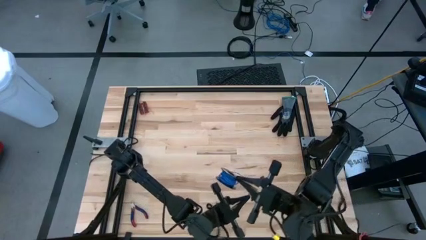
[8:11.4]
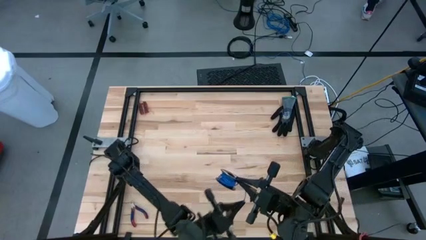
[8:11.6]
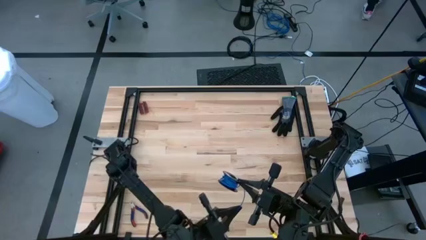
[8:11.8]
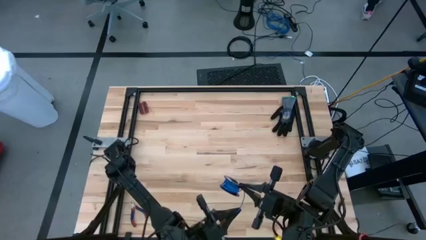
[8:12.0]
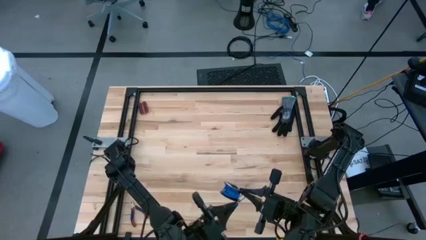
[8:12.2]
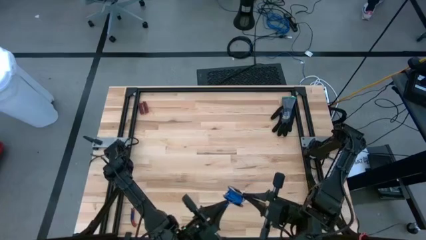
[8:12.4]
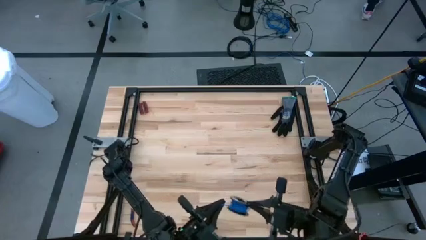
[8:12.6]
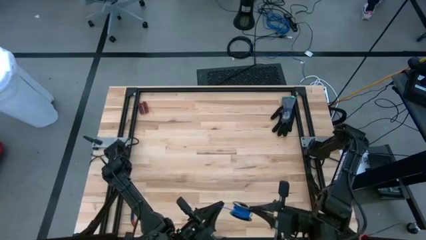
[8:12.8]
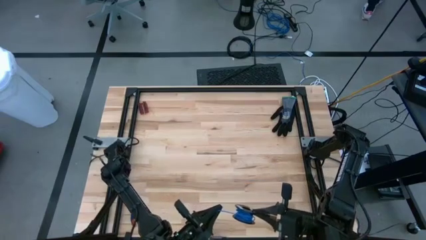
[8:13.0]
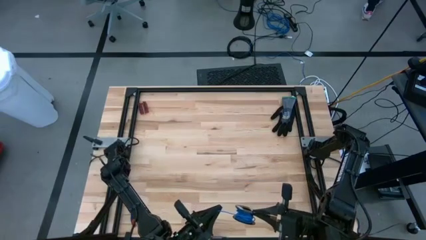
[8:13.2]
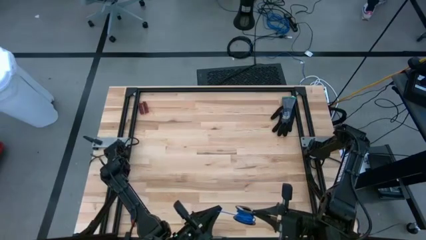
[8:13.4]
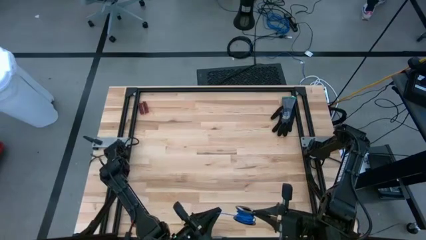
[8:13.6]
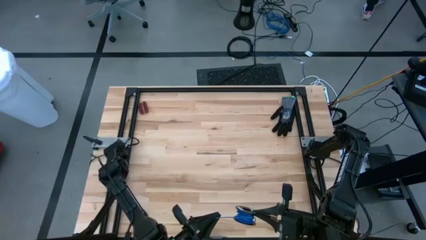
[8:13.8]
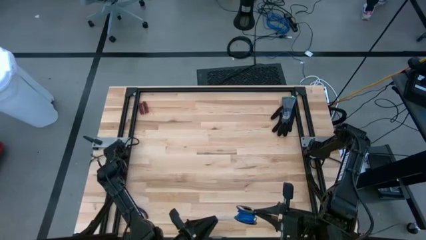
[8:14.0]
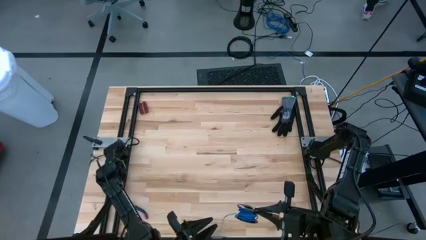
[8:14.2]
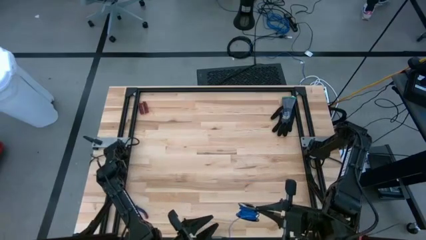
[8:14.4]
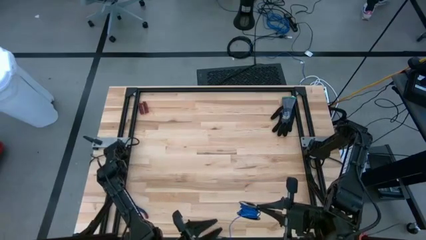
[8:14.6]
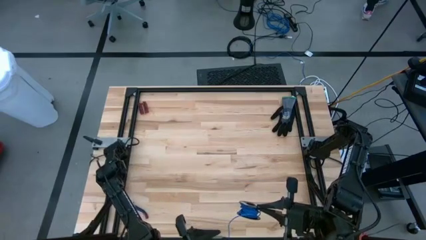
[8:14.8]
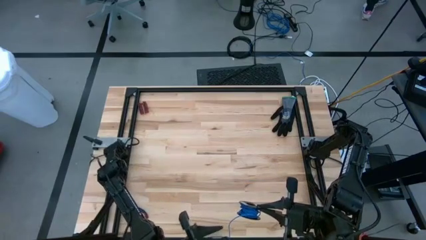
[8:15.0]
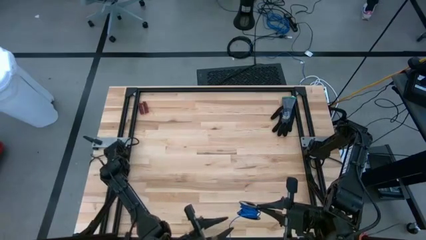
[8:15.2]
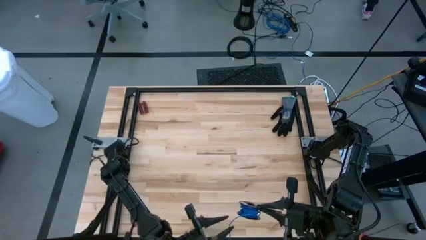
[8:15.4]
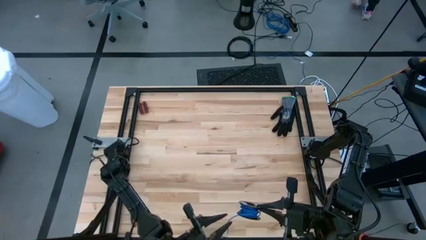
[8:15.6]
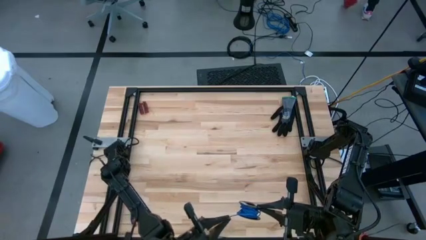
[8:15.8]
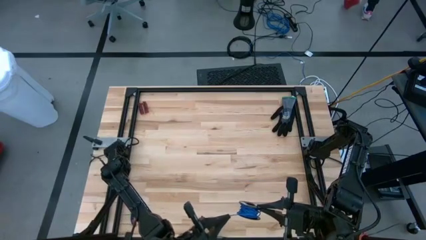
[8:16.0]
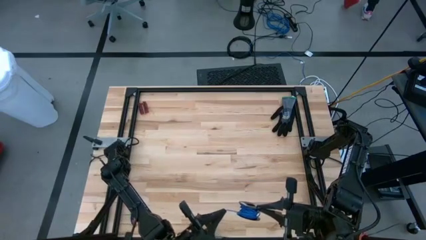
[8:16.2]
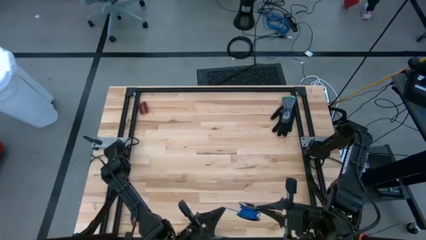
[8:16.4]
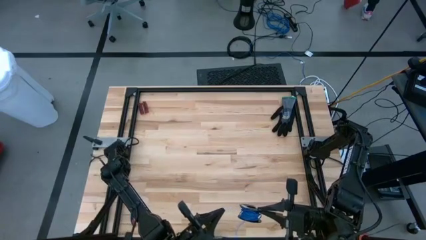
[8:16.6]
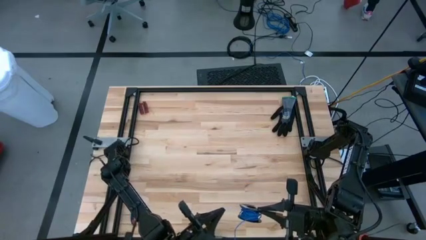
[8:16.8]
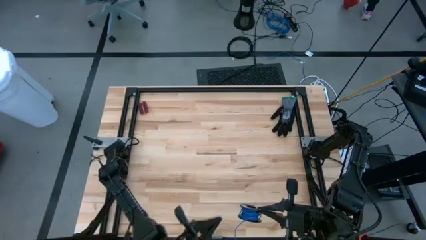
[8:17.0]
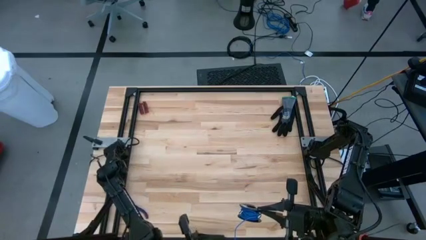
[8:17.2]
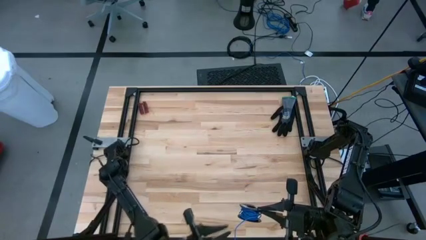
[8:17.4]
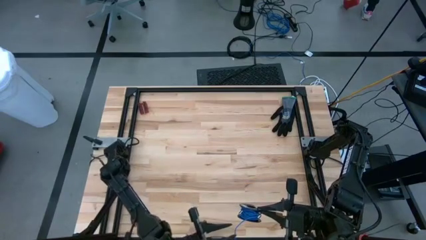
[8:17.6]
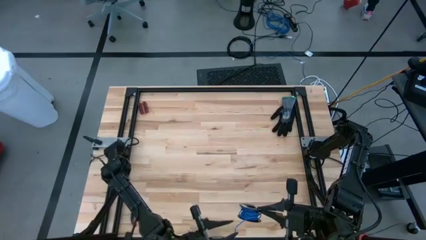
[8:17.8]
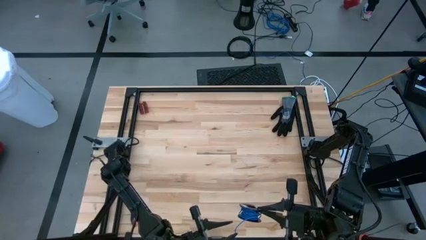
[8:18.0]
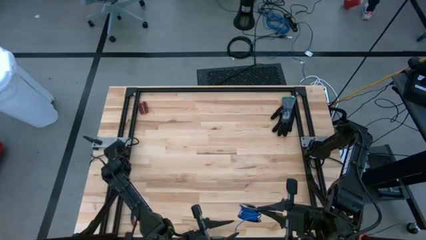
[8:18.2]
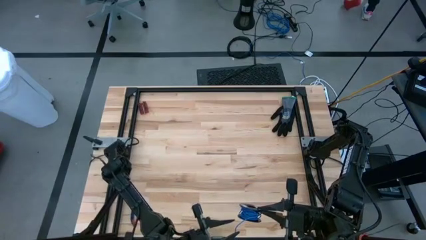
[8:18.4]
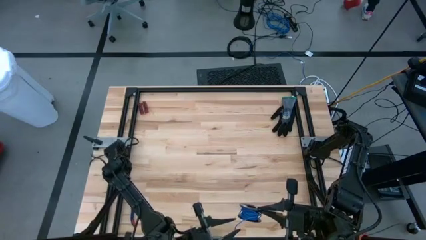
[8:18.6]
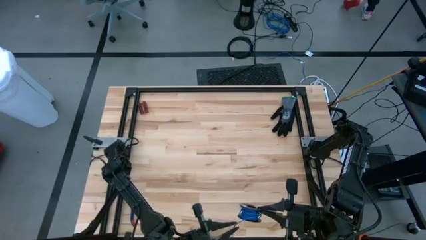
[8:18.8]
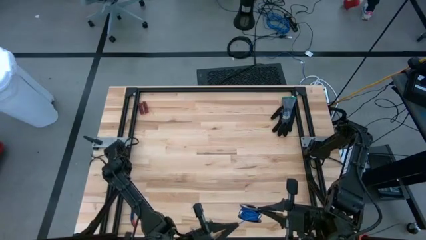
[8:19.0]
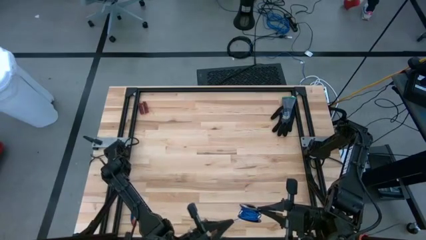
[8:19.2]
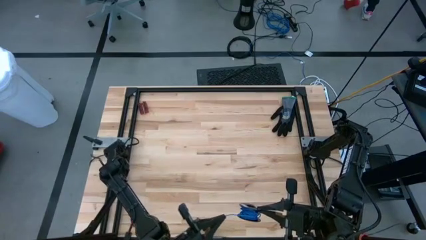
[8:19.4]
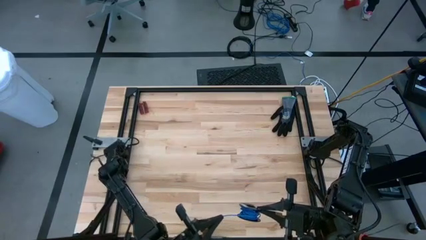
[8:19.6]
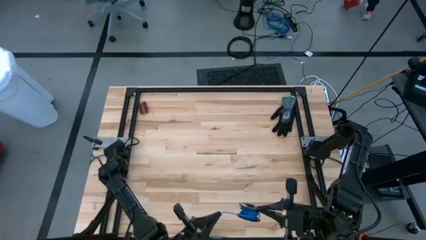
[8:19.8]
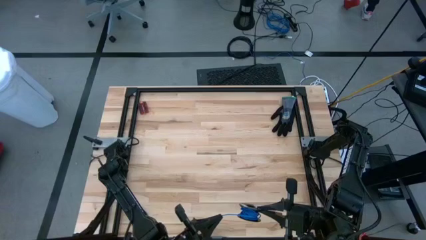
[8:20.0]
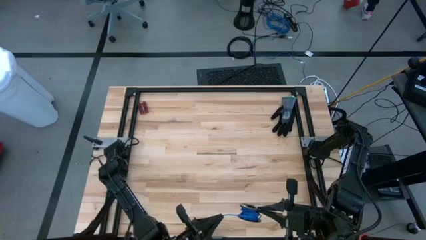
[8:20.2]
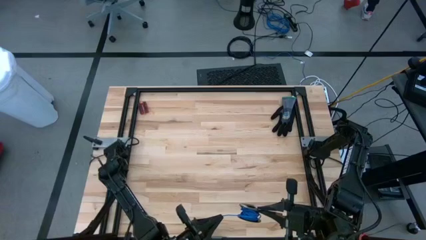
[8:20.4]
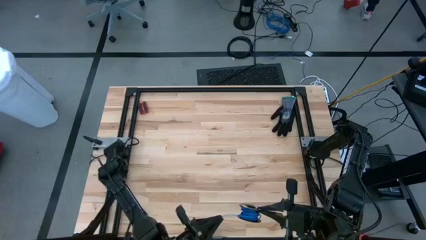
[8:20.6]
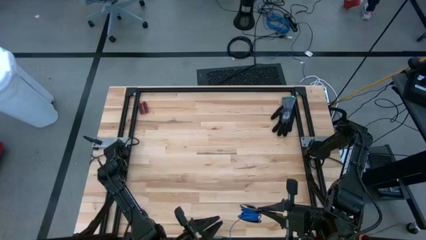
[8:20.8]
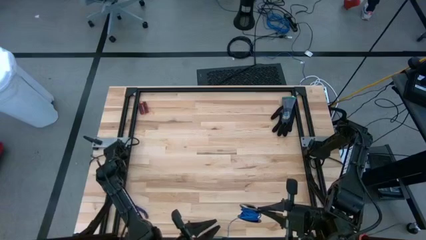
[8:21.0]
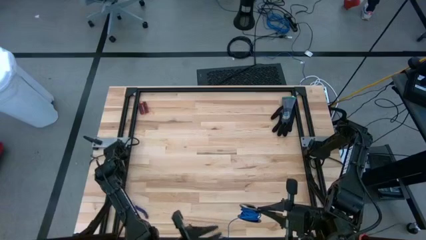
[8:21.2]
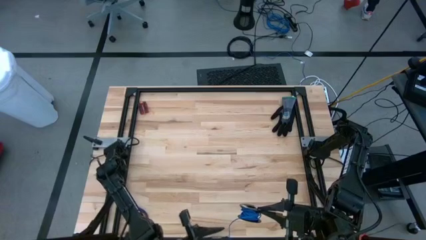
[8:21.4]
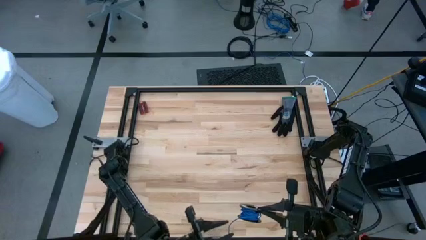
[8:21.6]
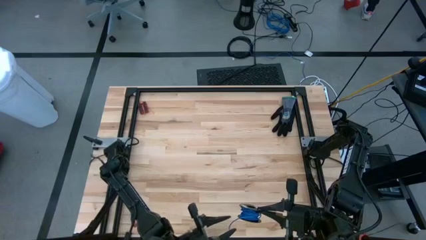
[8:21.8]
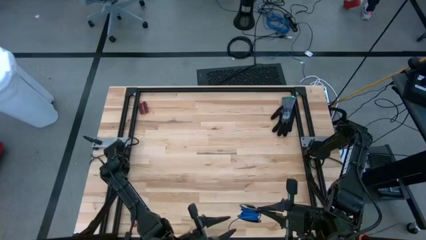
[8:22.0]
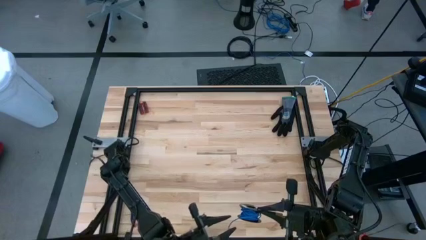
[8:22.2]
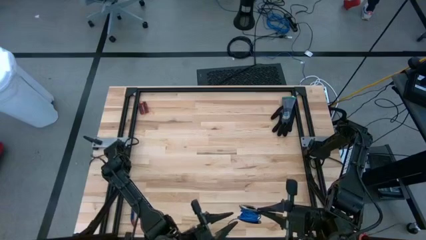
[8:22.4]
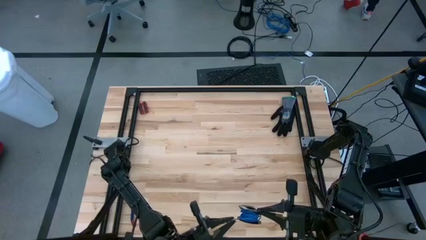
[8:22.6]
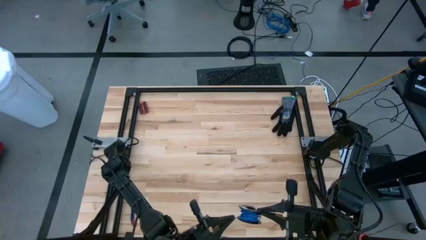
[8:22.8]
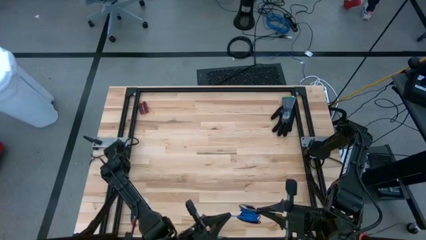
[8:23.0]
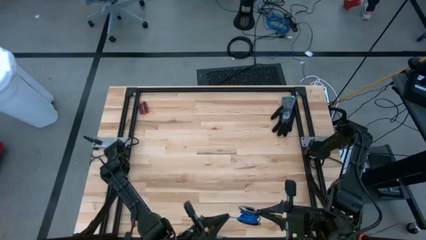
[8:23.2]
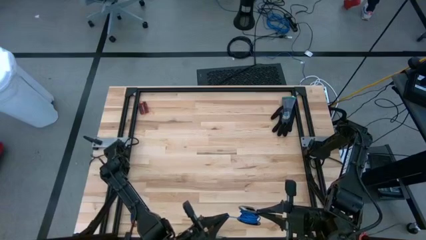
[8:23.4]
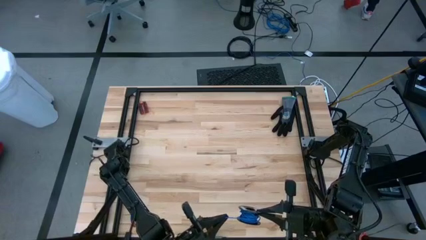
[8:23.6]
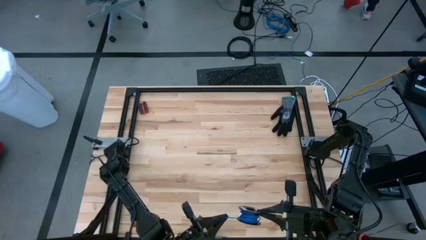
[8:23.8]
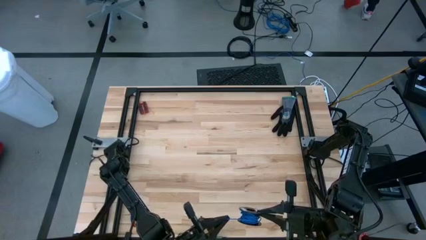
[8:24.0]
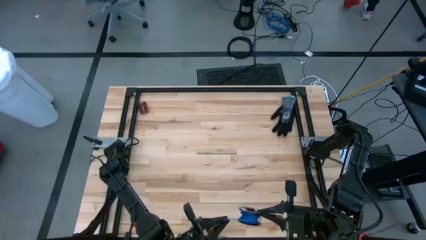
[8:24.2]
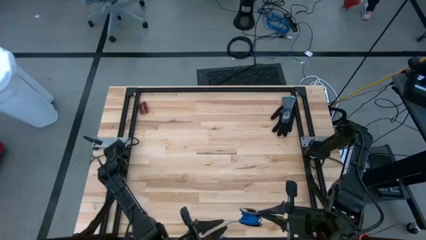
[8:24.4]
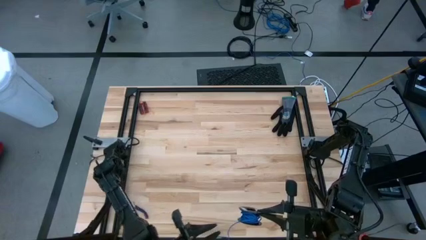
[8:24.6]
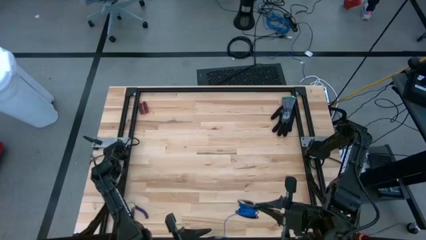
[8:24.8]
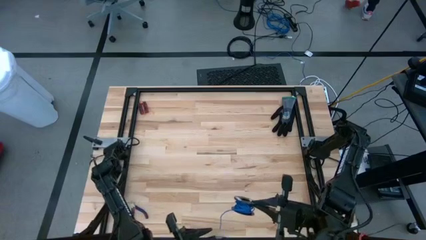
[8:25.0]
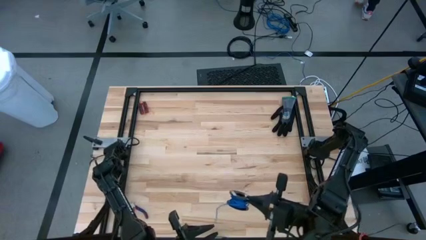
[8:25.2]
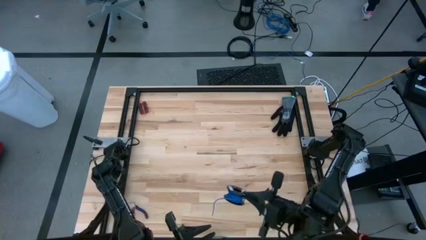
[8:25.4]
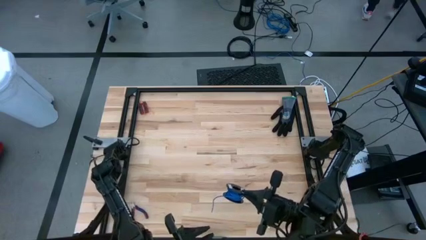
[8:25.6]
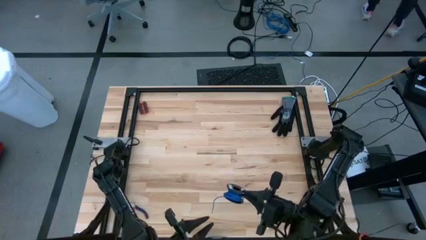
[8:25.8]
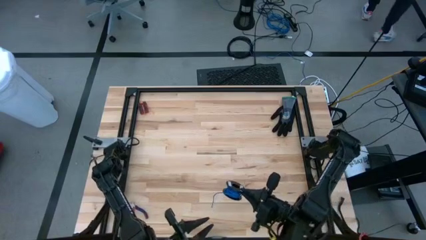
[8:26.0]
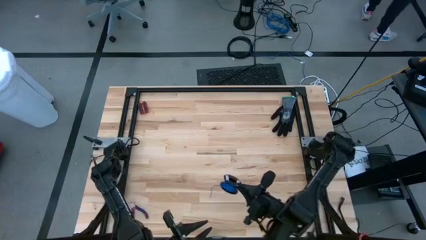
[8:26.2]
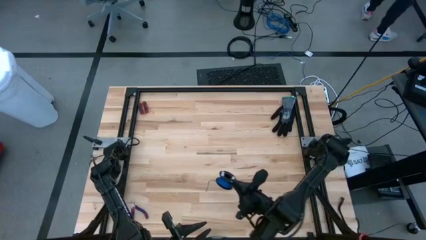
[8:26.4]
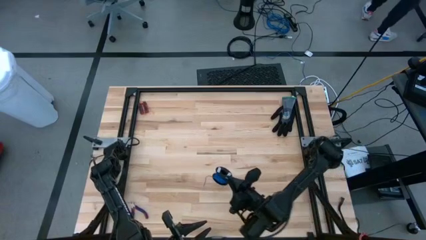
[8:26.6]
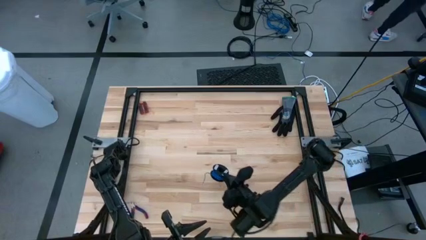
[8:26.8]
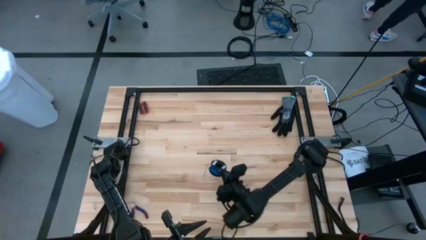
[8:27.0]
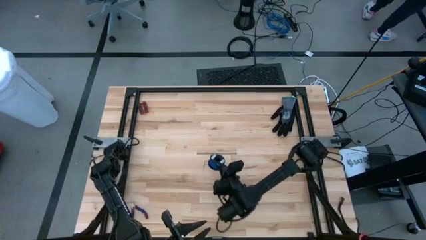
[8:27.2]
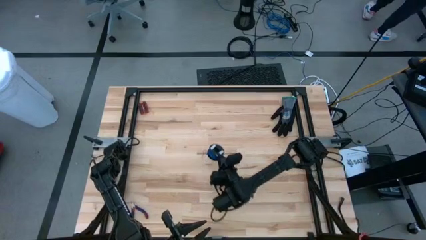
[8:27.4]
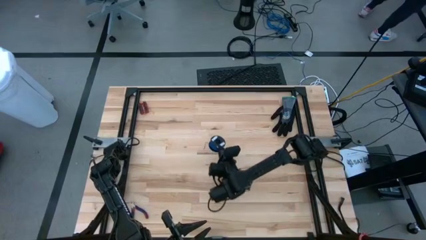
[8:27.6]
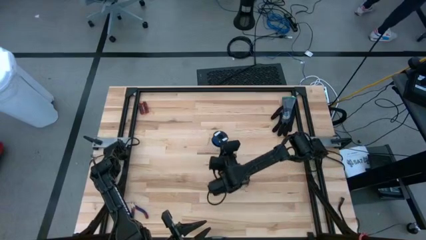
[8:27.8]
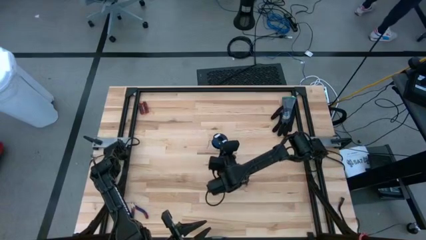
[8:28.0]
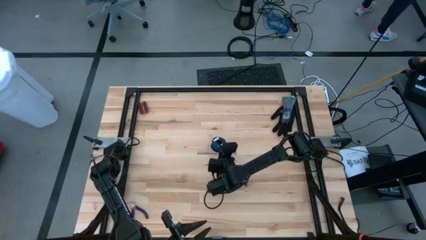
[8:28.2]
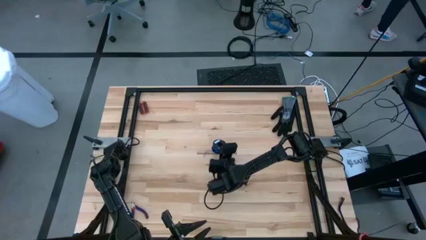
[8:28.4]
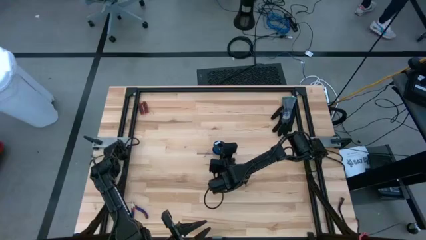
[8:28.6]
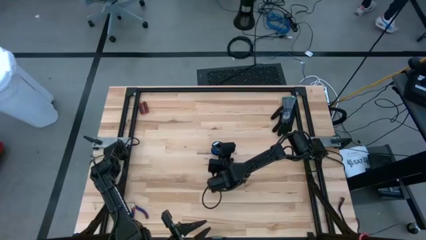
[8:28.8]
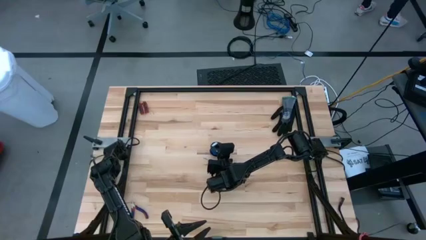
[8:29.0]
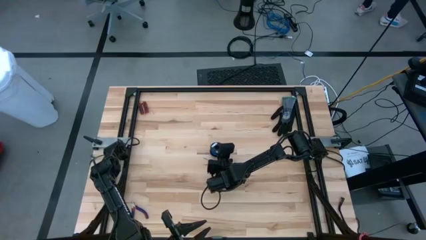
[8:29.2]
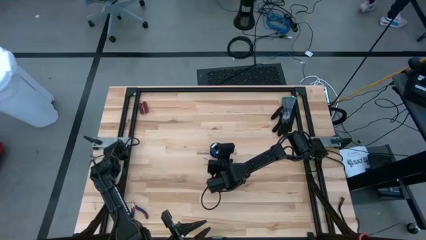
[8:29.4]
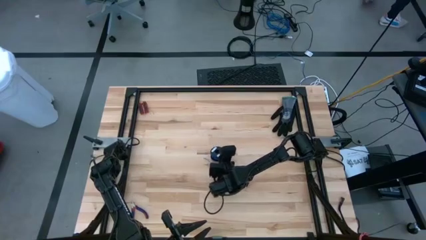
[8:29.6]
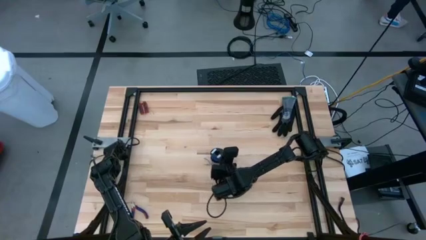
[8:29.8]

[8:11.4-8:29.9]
Task: Coil cords
Coil the blue wire onto a spool
